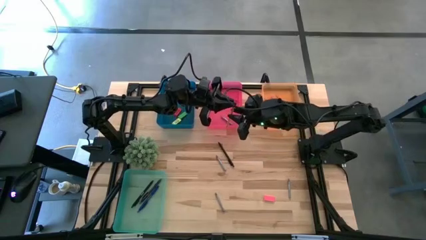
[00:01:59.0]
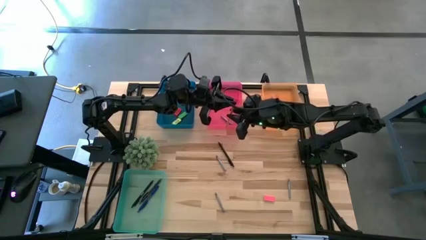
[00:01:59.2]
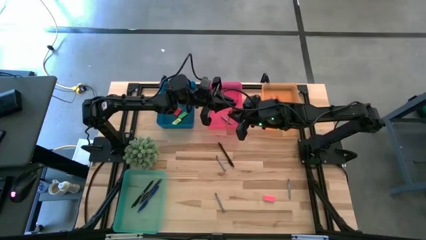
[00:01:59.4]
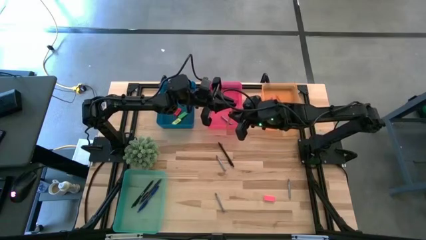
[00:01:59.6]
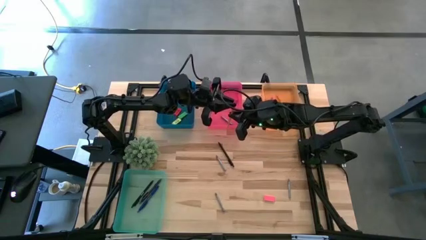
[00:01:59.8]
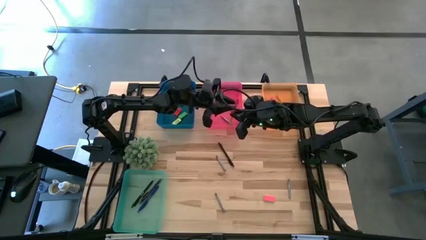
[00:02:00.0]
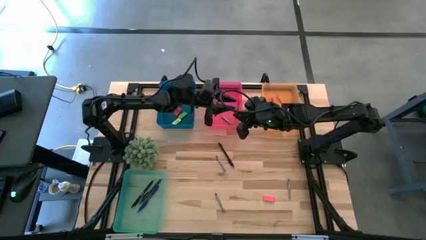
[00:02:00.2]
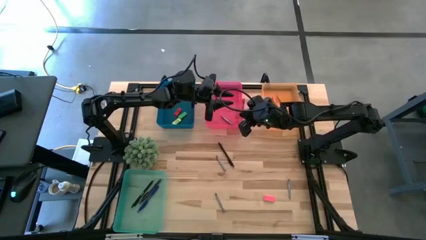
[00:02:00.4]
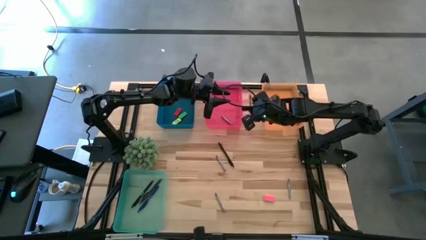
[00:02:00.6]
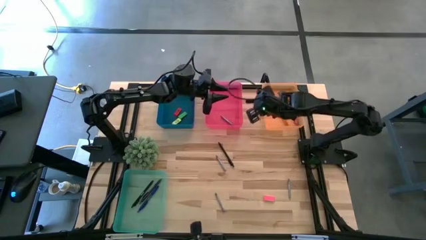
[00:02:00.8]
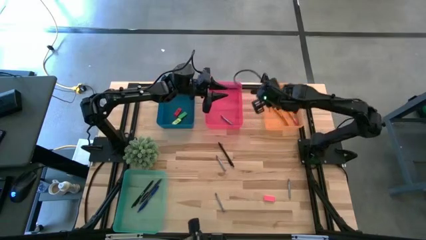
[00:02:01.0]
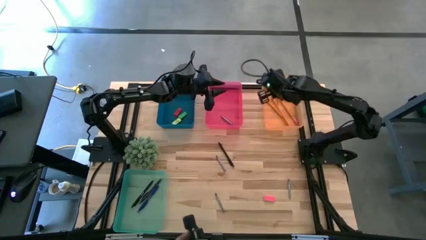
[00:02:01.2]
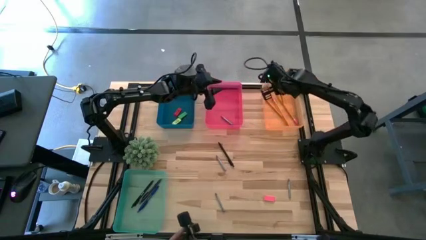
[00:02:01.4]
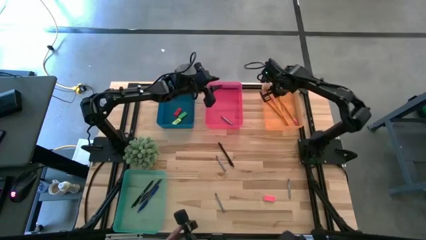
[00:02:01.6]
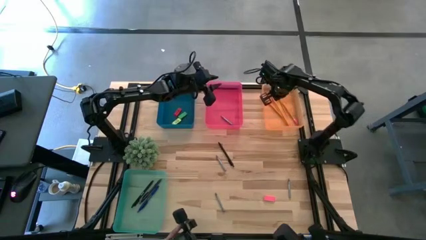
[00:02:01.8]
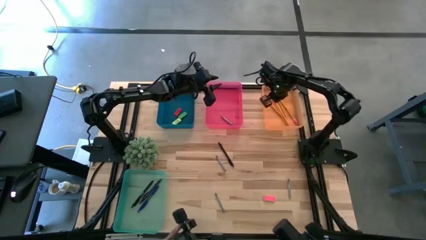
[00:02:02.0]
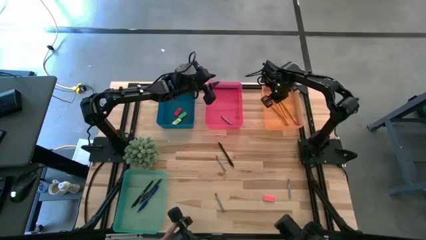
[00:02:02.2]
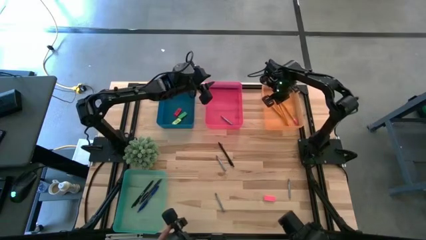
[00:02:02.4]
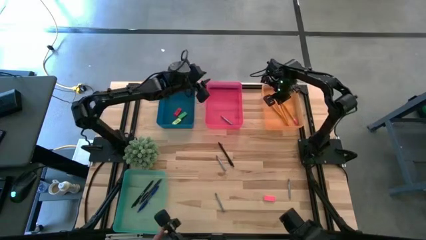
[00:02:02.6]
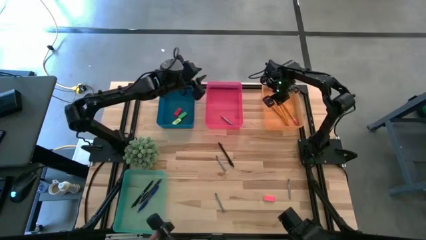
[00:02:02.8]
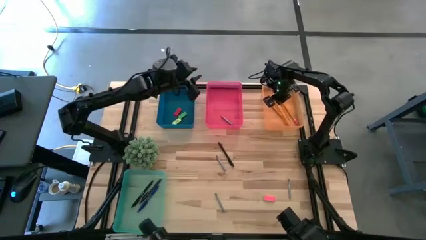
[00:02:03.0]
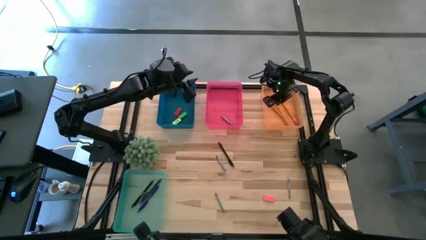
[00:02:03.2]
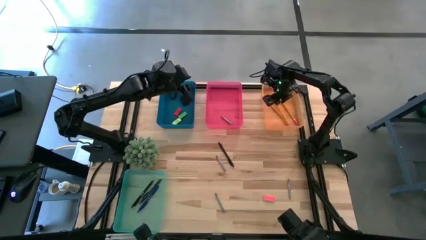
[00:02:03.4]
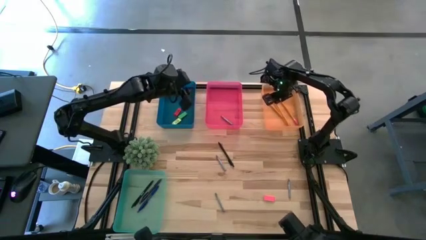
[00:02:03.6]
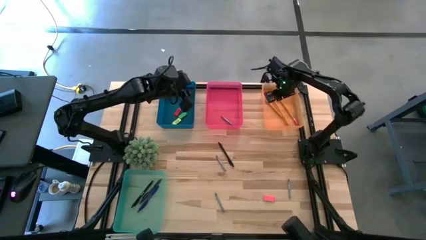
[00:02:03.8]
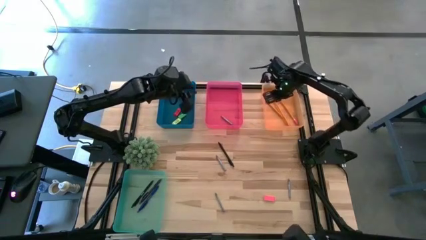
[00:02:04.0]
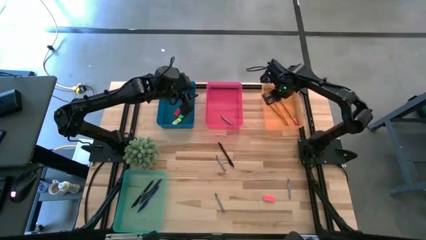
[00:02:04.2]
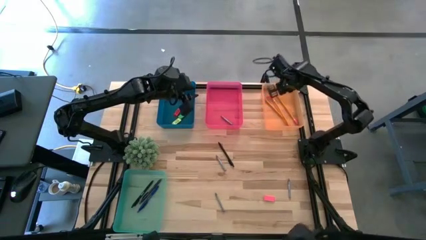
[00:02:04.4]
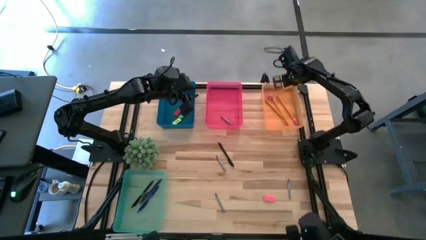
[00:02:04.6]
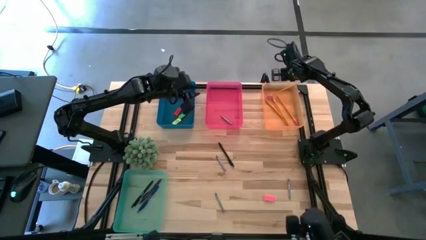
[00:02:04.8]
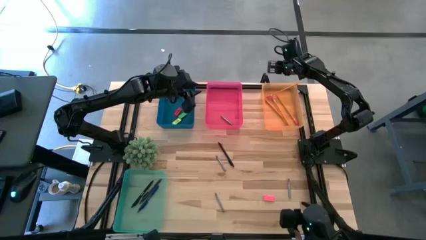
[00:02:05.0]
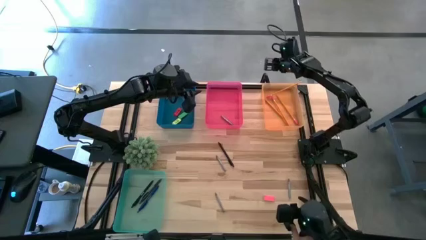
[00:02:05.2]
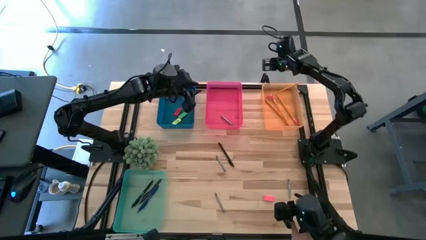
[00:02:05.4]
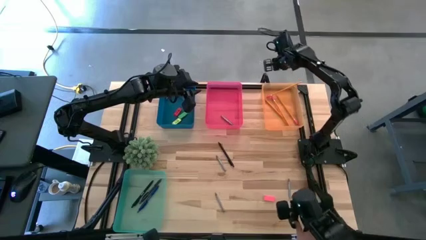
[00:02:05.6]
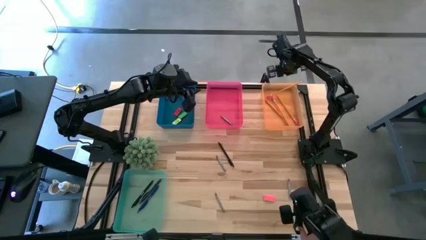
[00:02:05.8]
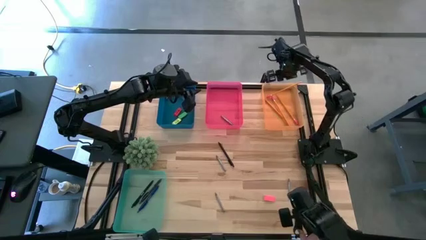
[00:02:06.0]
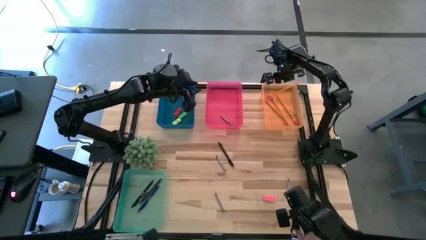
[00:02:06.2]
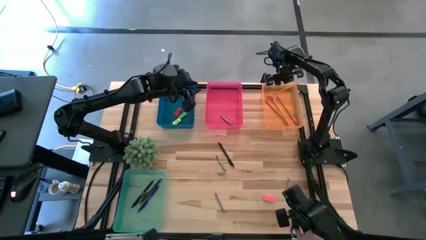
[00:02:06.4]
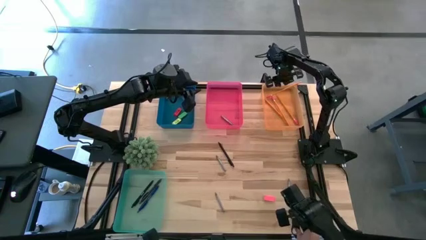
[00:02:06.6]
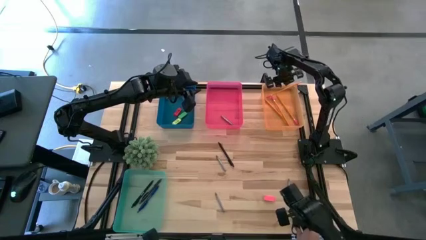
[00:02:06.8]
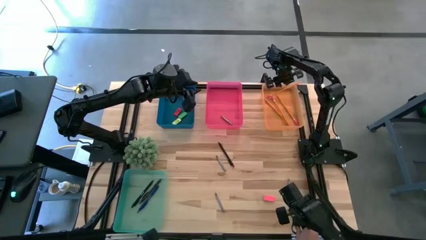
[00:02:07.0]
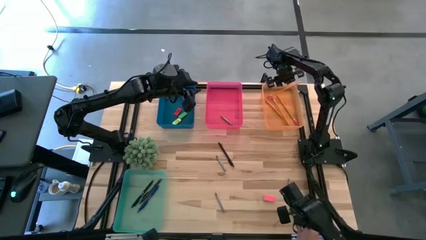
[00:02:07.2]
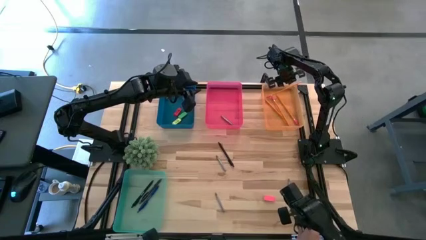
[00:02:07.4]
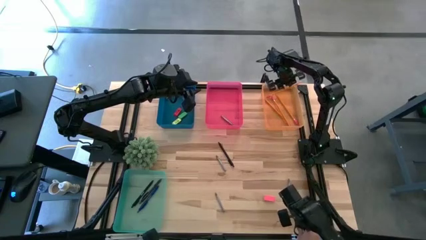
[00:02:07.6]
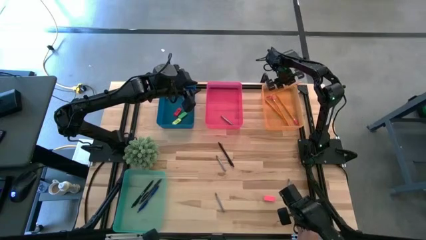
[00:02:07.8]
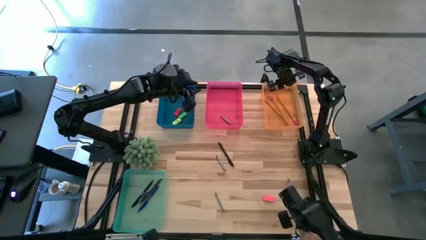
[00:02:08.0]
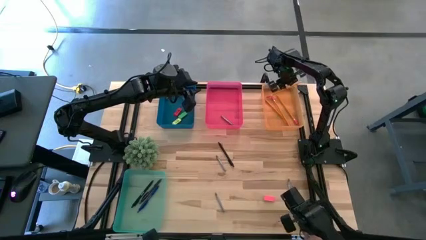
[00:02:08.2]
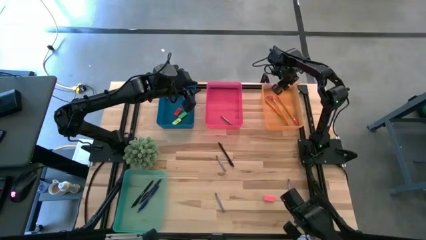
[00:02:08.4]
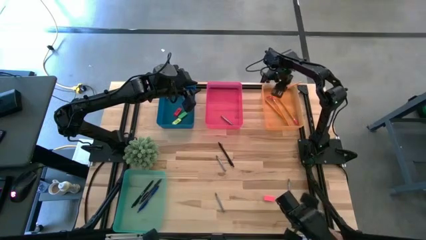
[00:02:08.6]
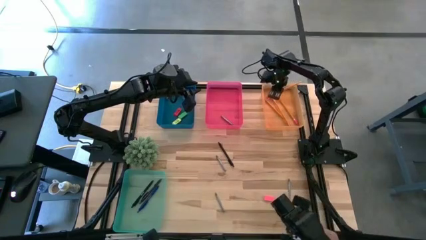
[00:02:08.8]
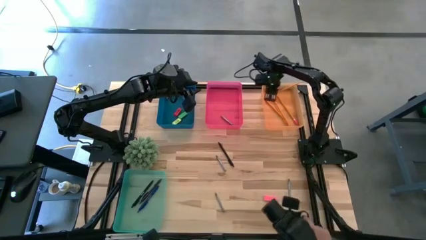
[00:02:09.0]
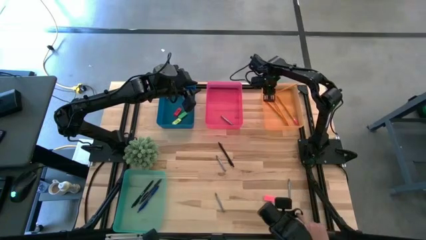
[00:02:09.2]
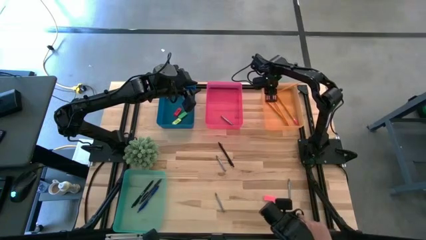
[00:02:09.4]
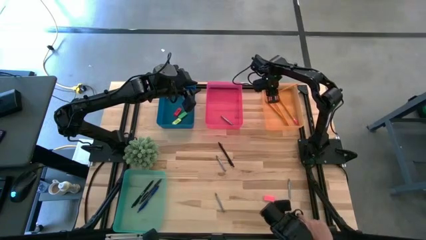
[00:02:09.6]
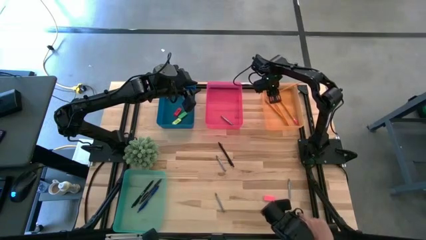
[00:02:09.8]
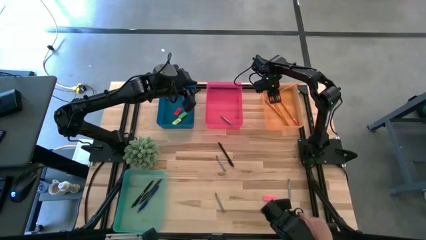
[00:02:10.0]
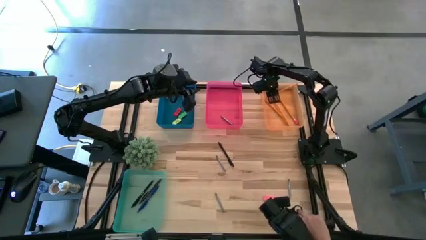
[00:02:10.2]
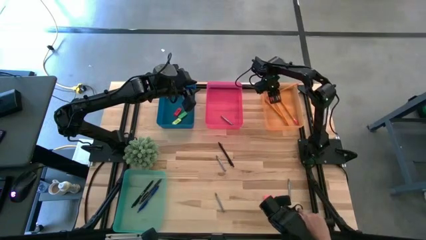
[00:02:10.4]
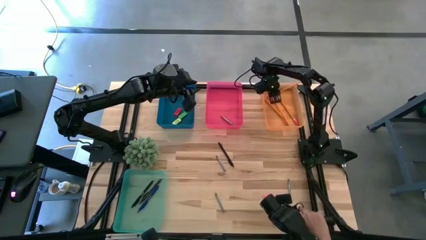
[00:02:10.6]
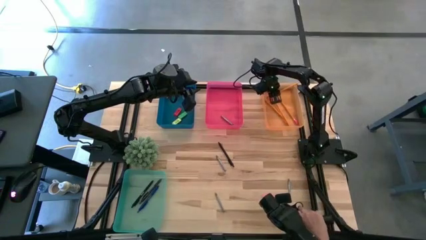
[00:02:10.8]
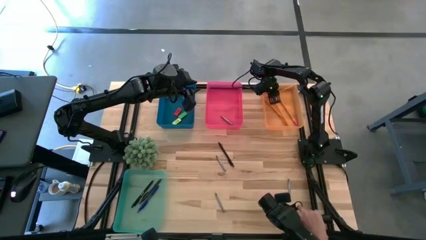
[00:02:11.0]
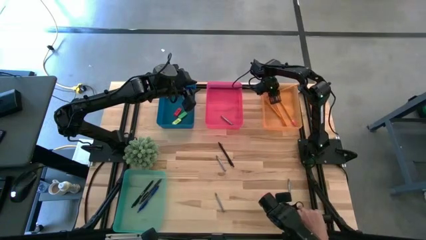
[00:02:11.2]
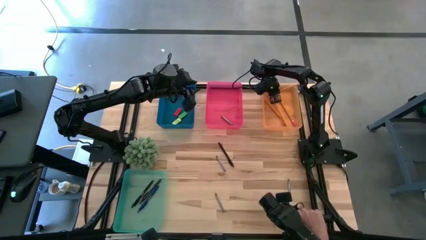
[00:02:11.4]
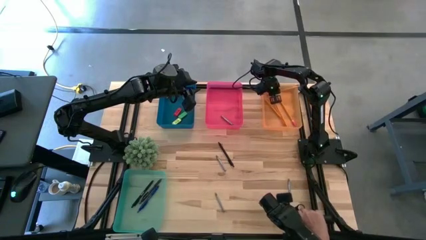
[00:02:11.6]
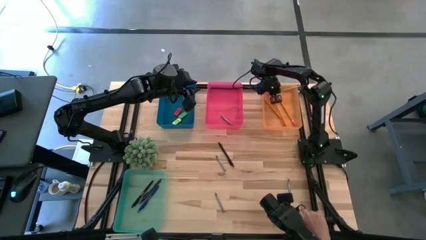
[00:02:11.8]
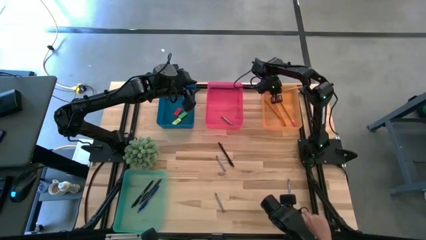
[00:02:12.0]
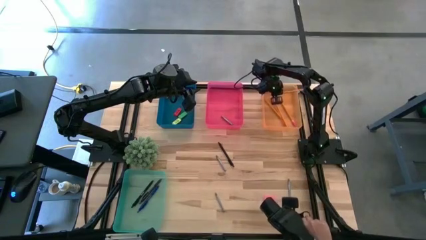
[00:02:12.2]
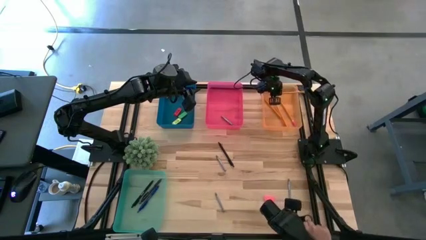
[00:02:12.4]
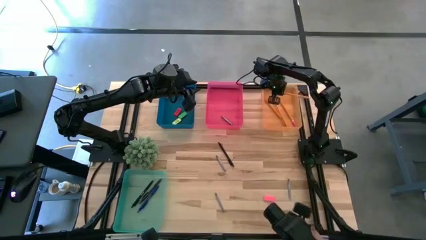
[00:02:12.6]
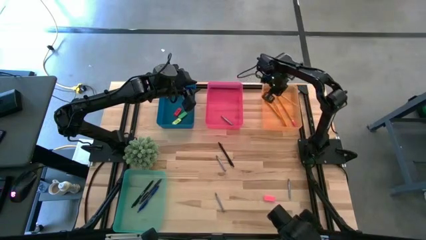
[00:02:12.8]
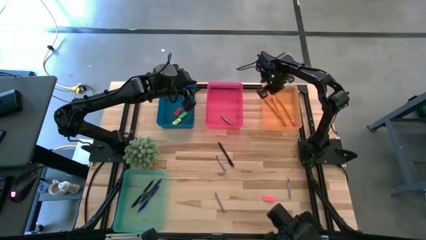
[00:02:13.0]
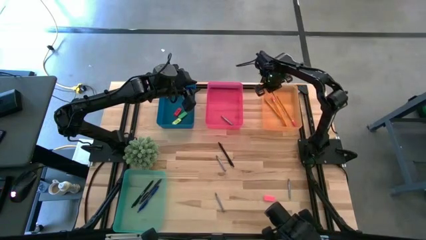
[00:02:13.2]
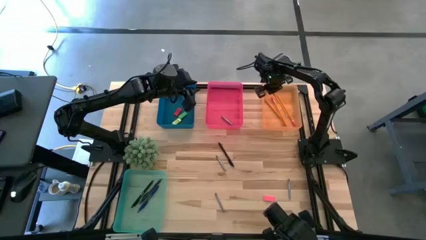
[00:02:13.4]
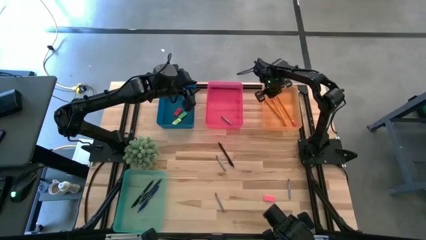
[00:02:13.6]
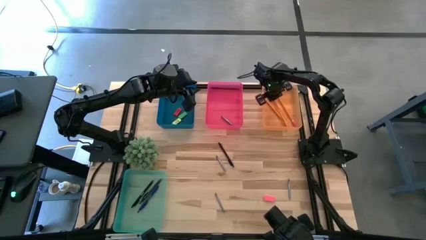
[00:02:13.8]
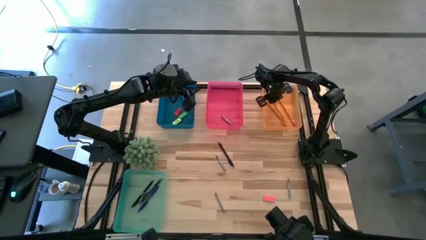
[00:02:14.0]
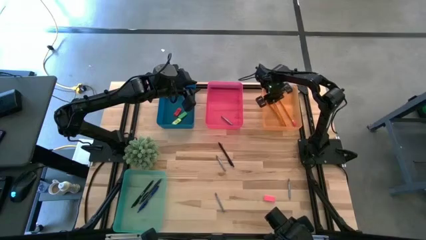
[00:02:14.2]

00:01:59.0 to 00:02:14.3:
Task: Sort crayons/erasers/pens/pencils in bins
Put the pencil into the transparent orange bin
